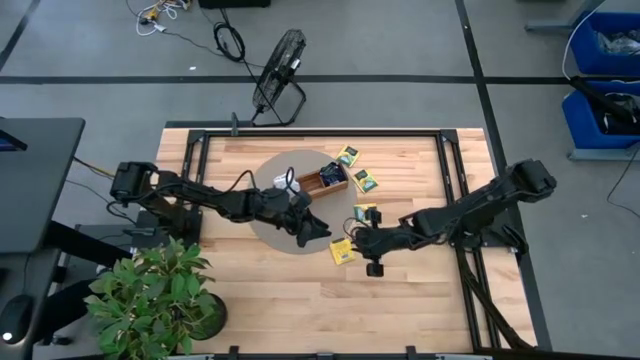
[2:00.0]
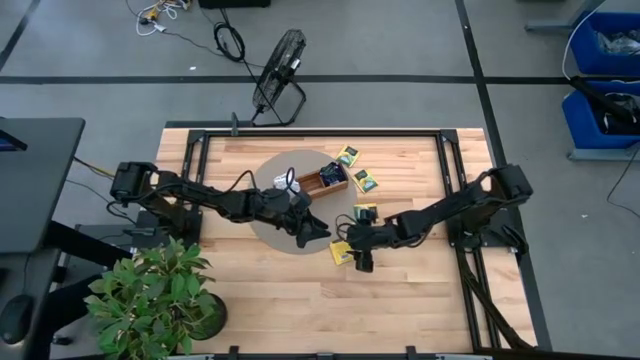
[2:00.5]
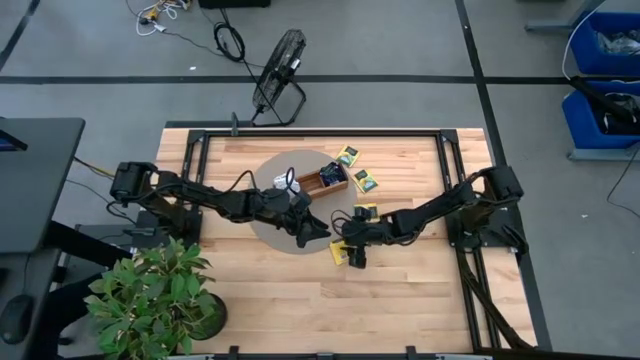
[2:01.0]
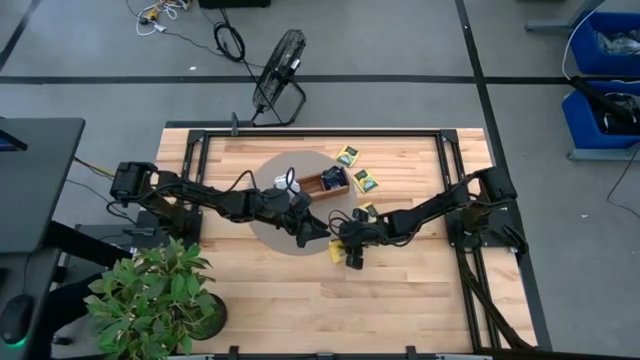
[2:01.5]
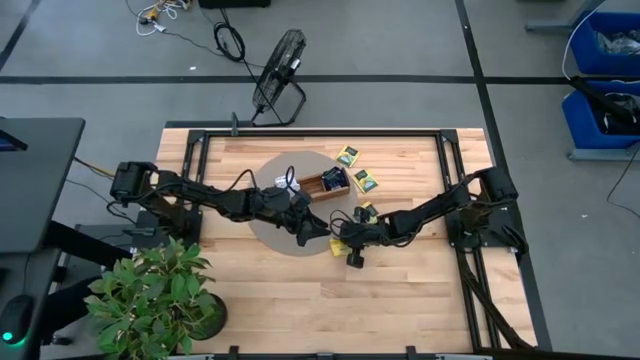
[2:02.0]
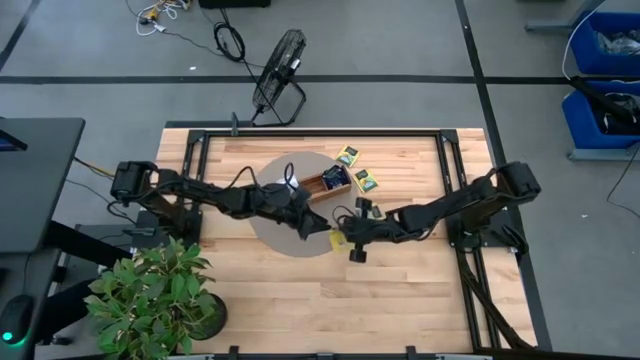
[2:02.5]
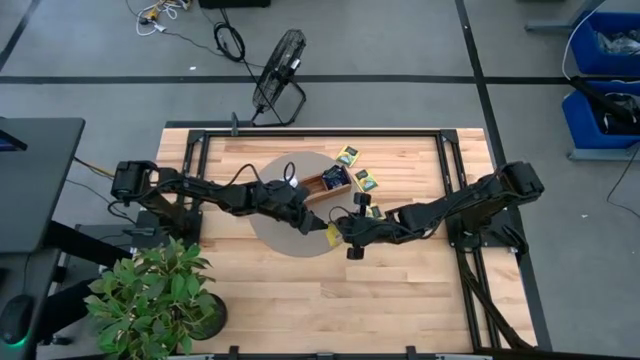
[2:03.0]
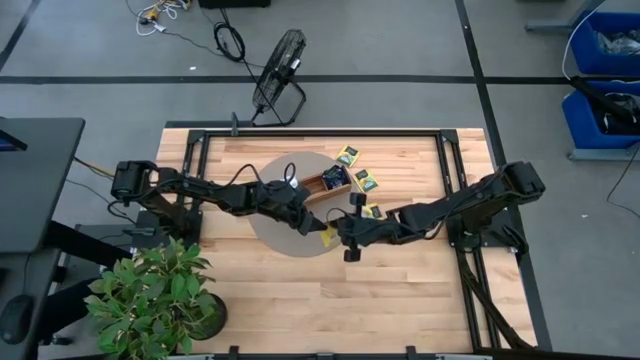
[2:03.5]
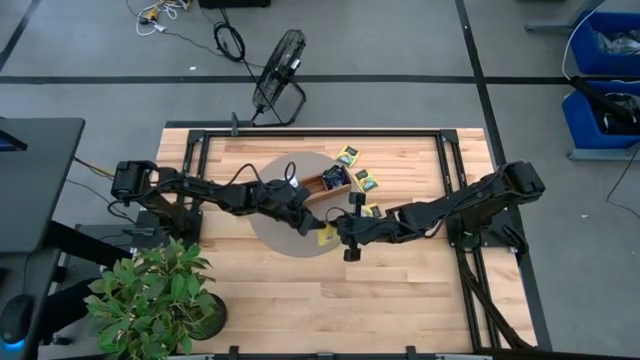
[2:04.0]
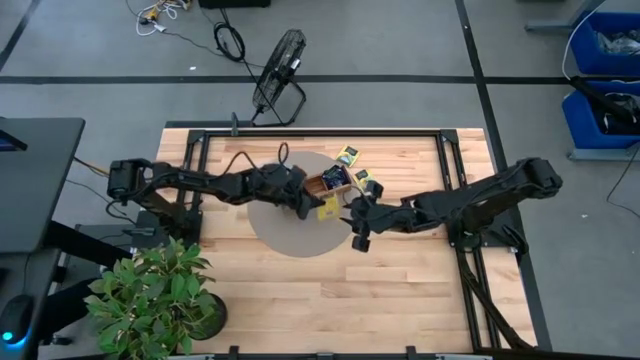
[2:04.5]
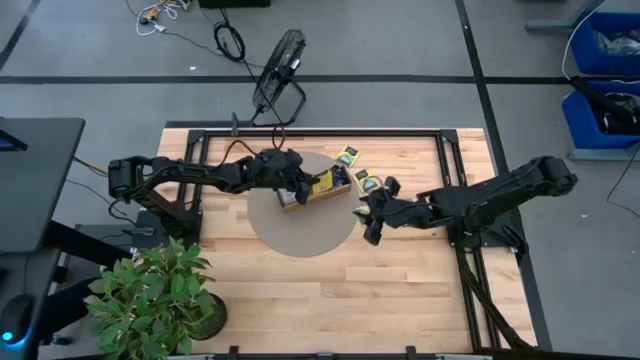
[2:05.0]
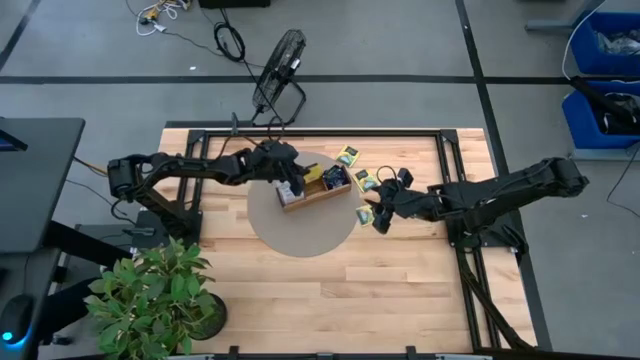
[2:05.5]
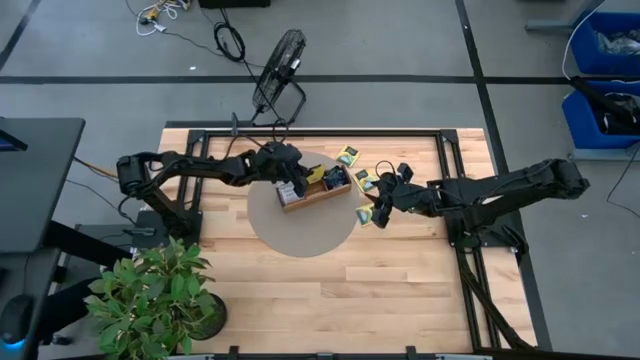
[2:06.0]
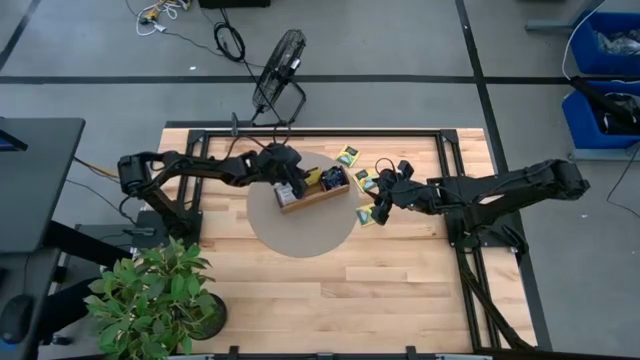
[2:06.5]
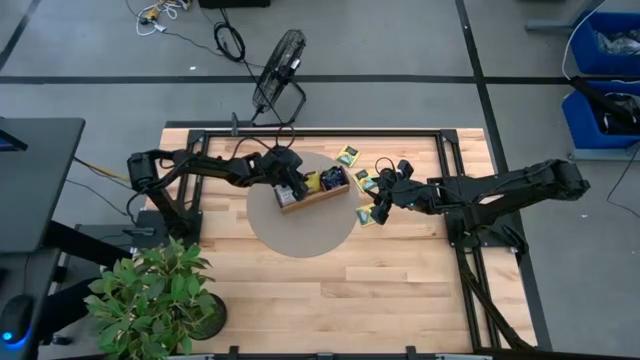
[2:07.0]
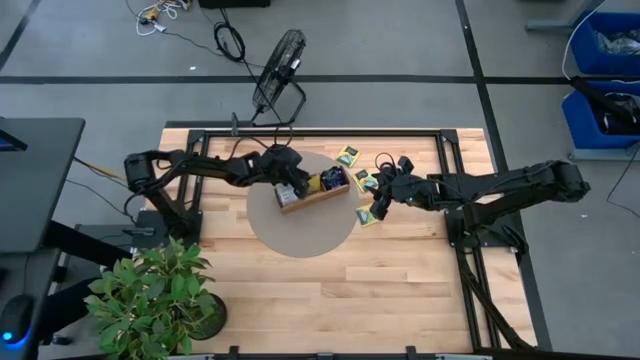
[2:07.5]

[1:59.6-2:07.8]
Task: Pick & Place Tea
Put the yellow tea bag into the middle section of the wooden organizer

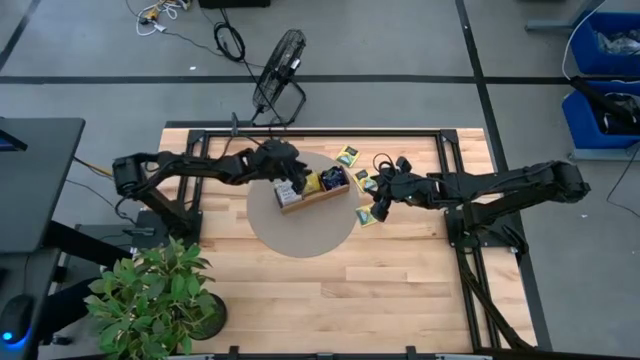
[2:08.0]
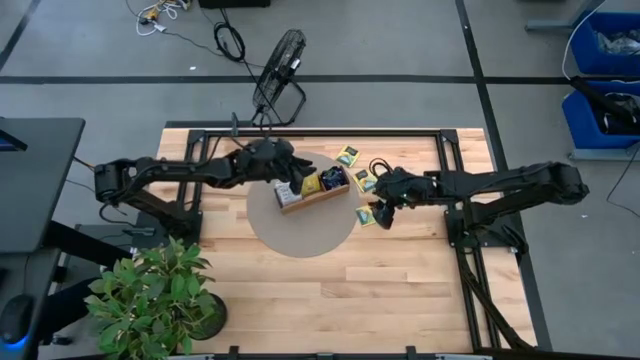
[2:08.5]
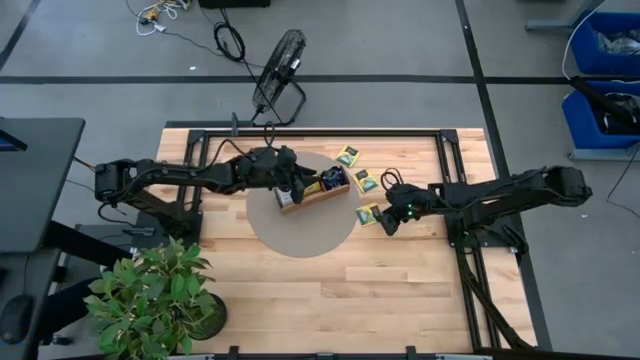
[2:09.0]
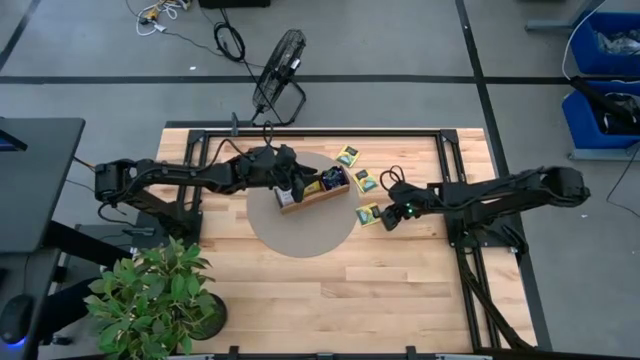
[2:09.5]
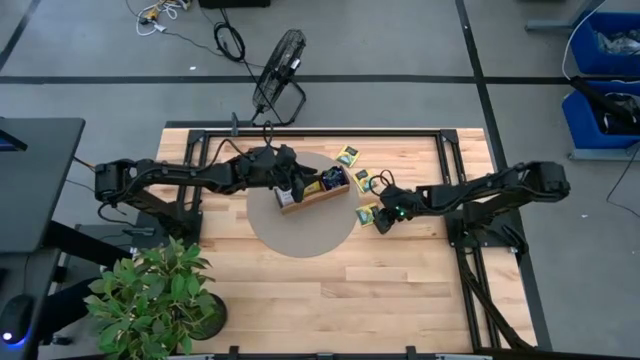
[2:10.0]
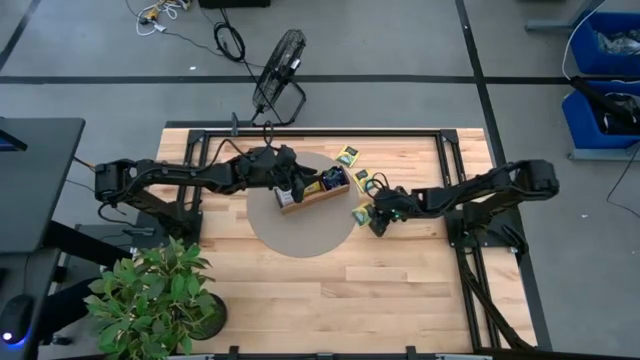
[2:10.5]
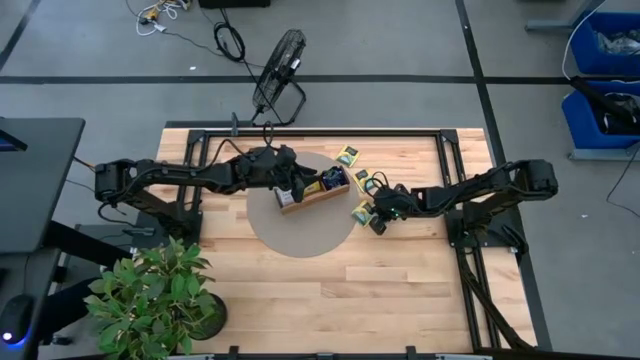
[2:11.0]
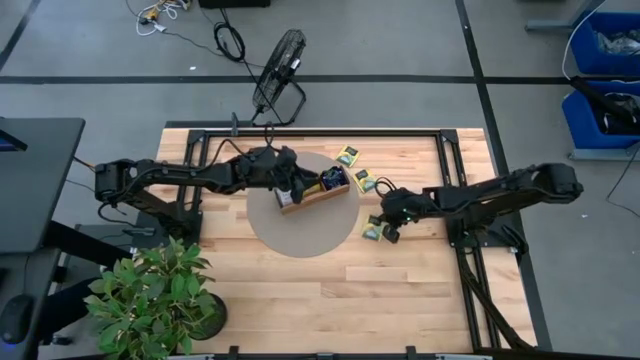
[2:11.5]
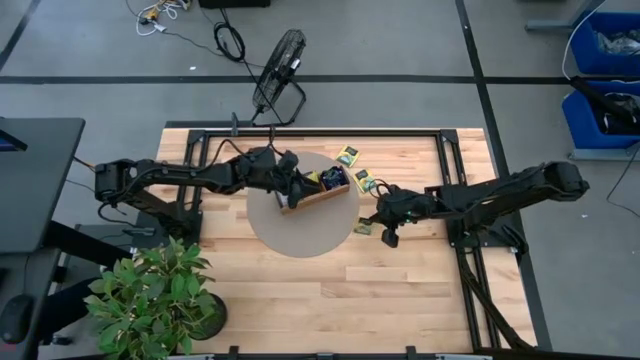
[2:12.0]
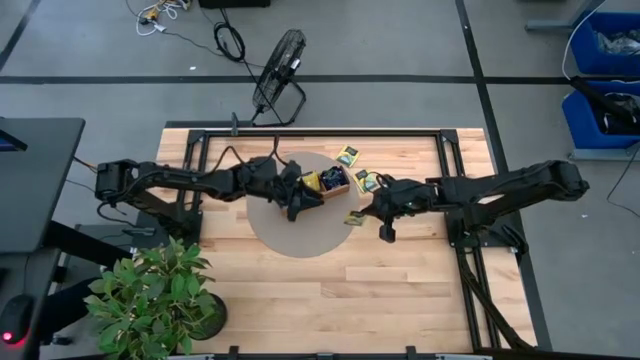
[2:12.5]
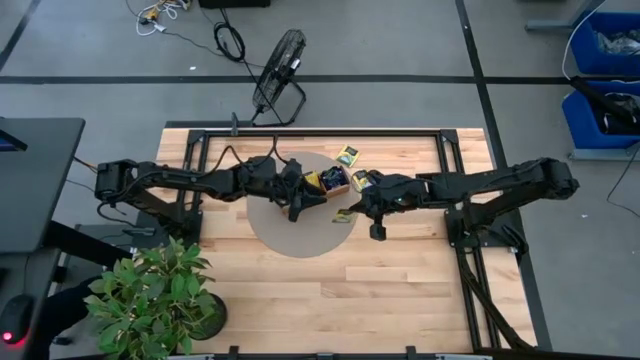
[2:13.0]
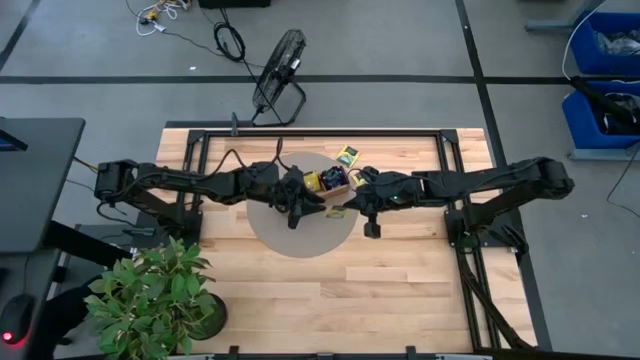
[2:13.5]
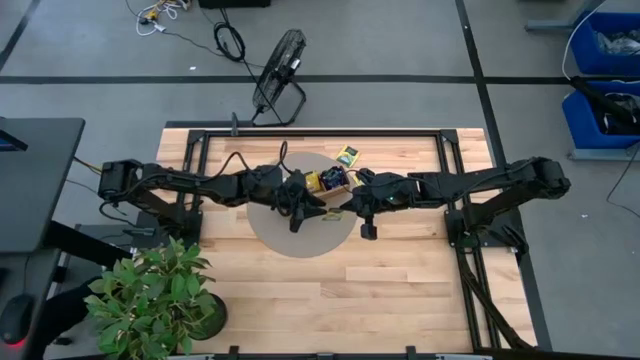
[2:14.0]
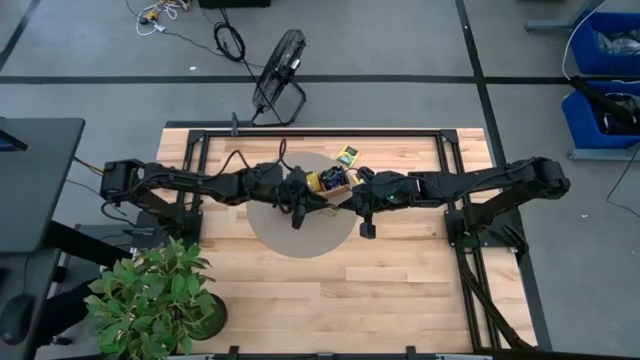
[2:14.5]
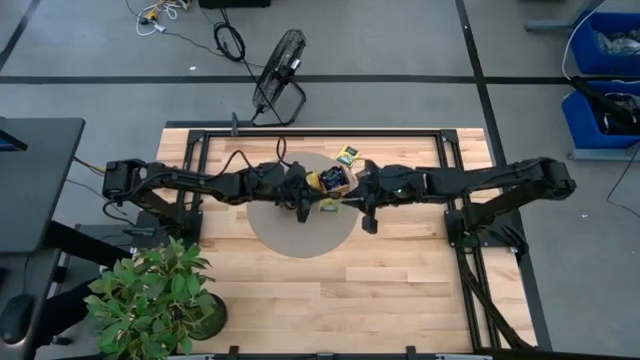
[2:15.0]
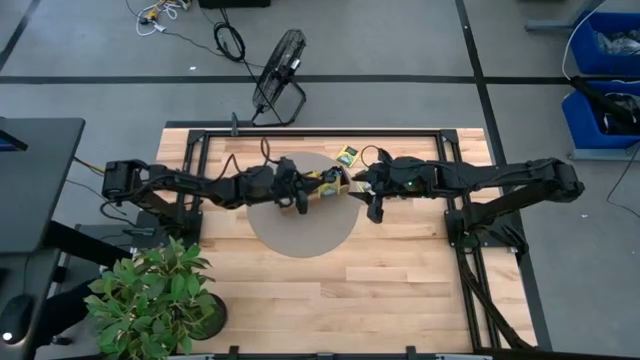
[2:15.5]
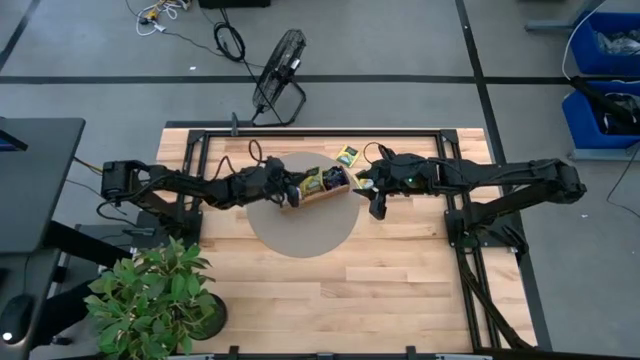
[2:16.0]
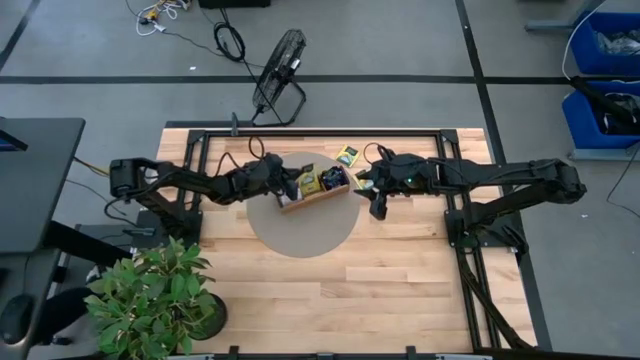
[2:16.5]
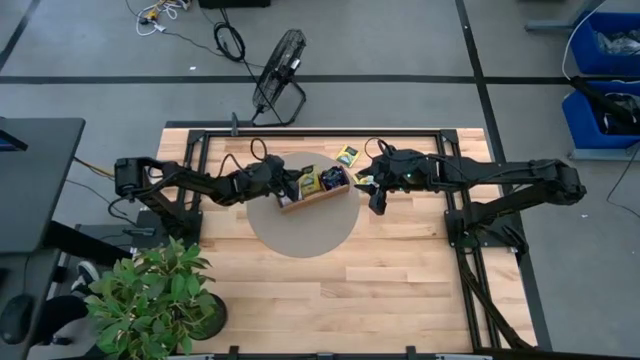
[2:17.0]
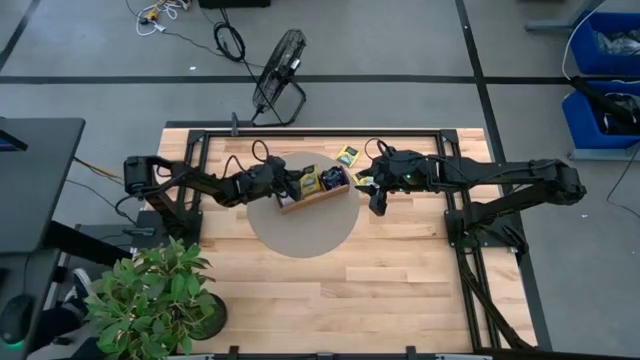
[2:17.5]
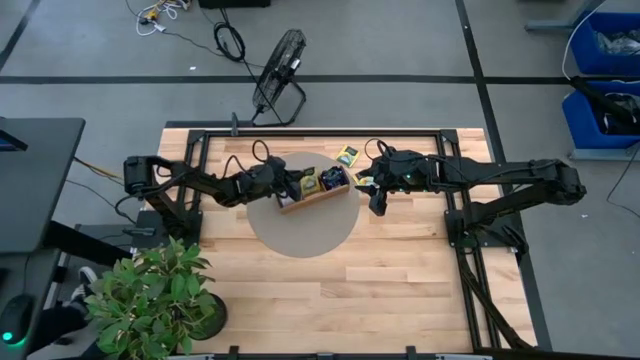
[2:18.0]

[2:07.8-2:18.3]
Put the yellow tea bag into the middle section of the wooden organizer

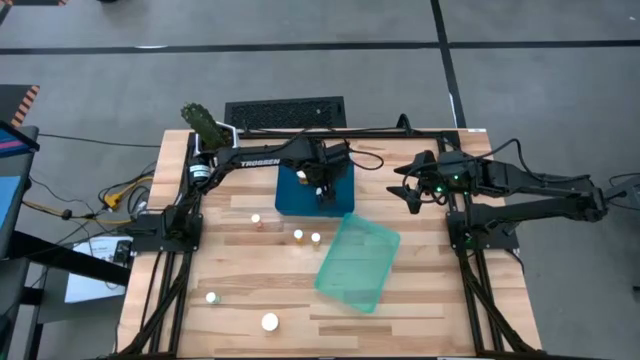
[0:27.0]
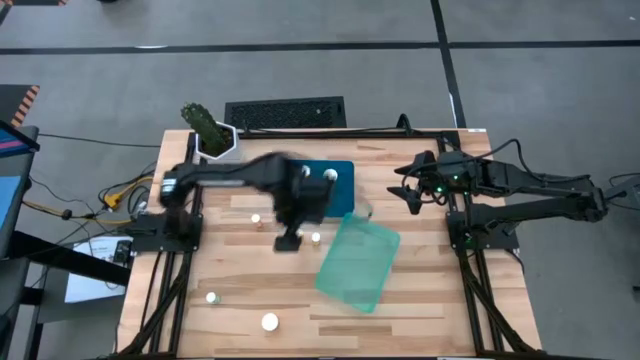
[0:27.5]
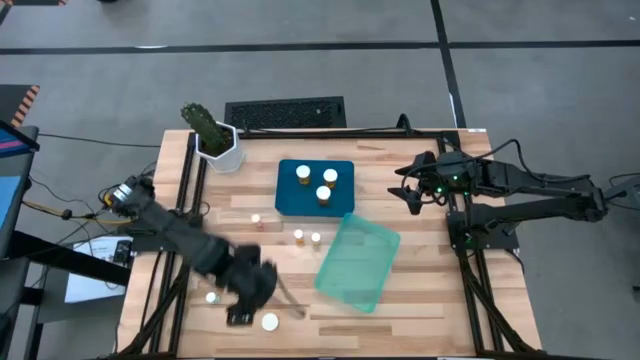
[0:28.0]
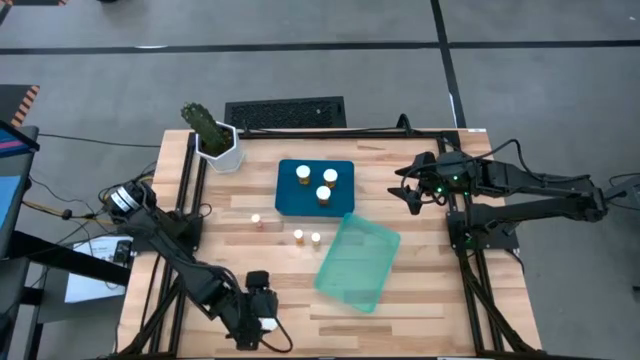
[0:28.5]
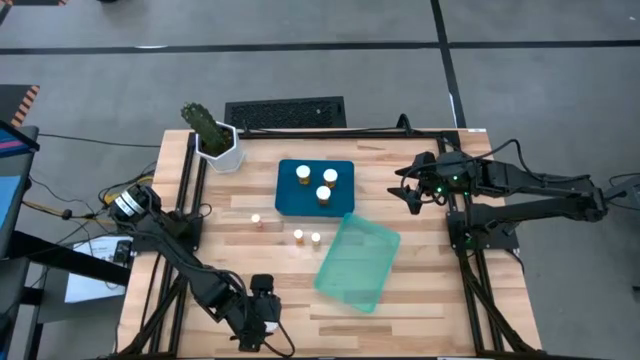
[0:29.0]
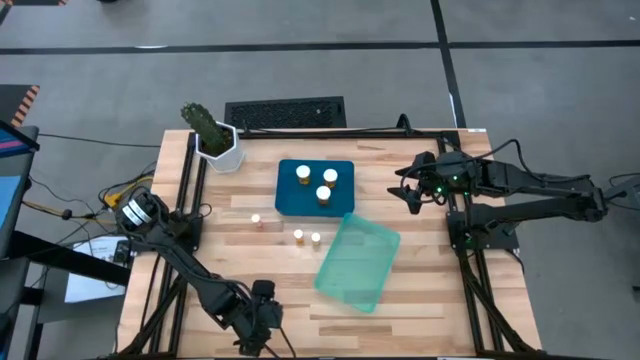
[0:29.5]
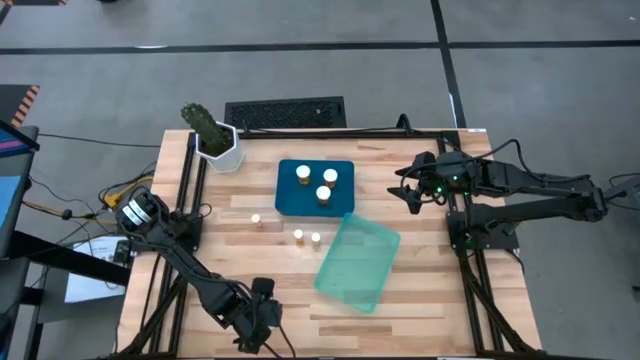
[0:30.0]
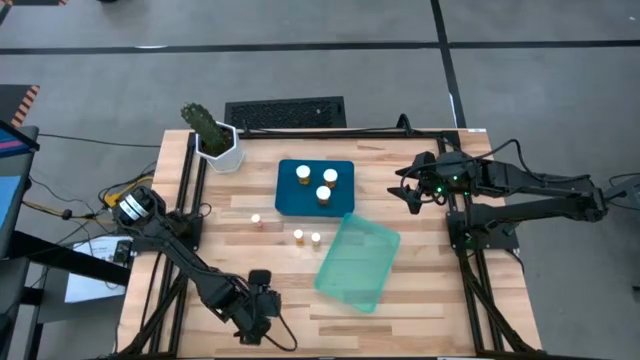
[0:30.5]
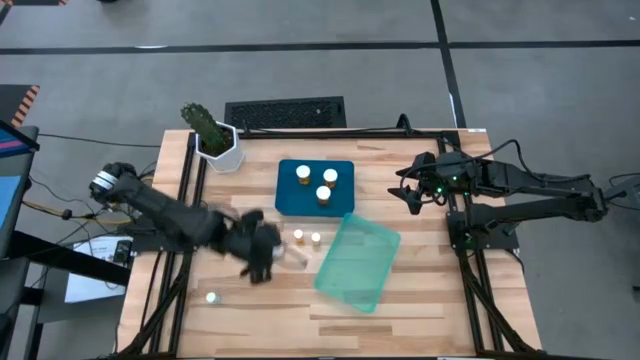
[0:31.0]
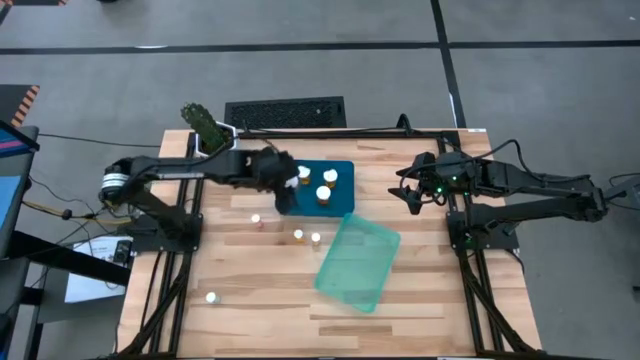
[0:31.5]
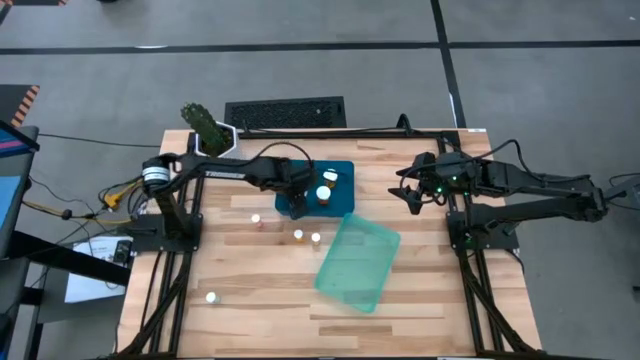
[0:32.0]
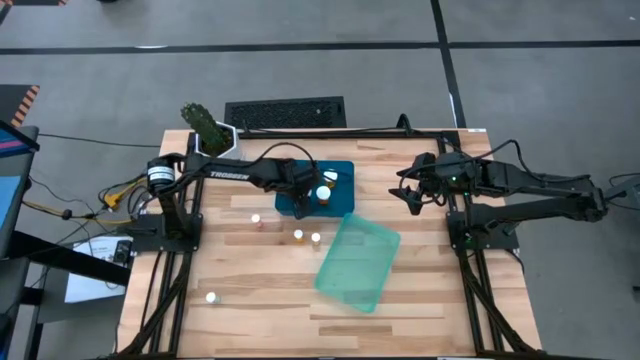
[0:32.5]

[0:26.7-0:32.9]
Task: Pick and place medicine bottles into bin by pill shape (circle, oval)
Put the large orange pill bottle into the blue bin
